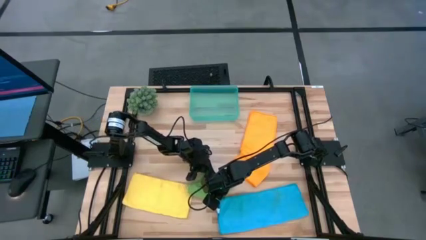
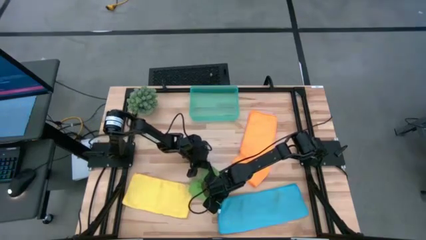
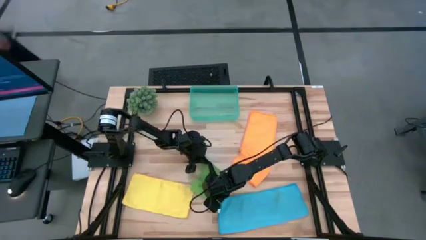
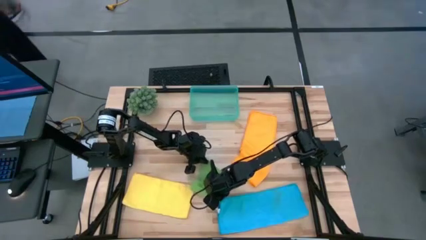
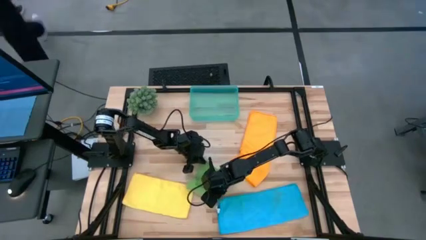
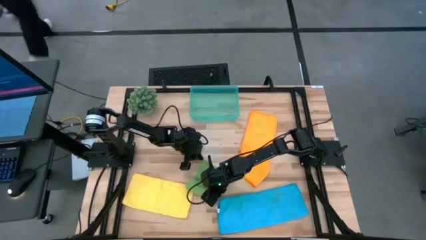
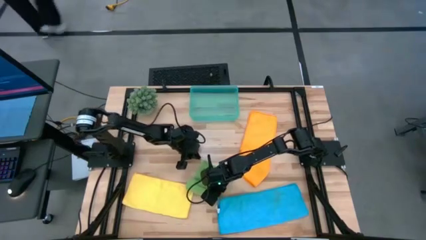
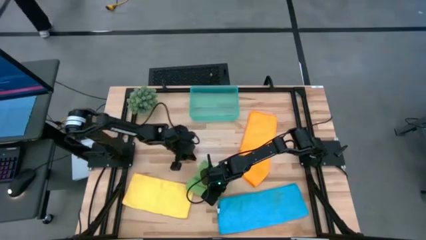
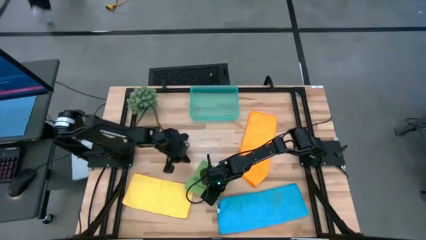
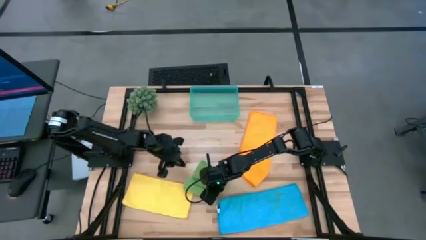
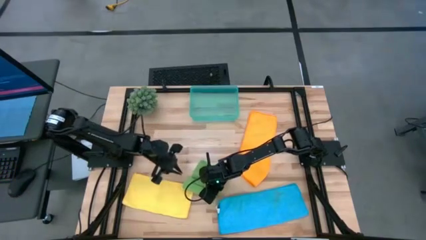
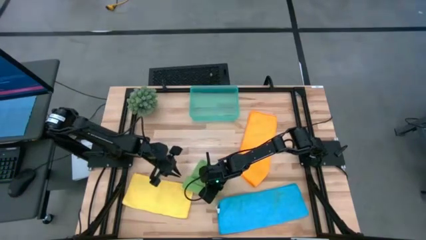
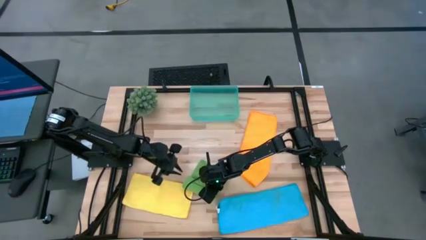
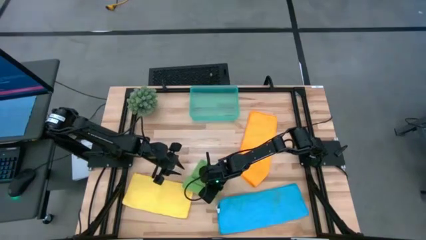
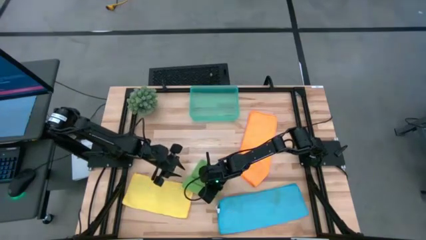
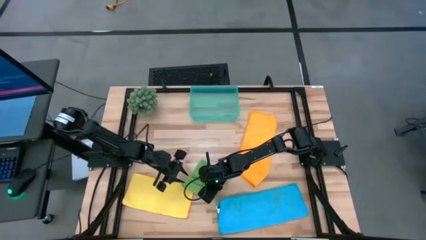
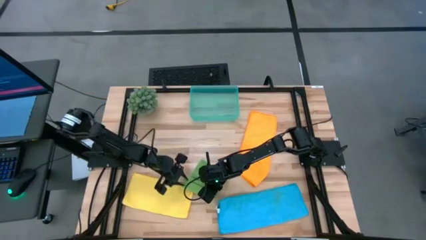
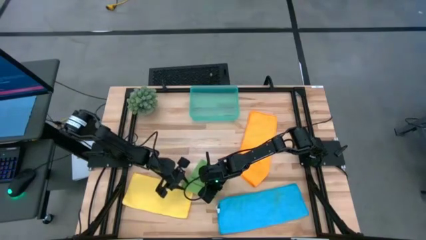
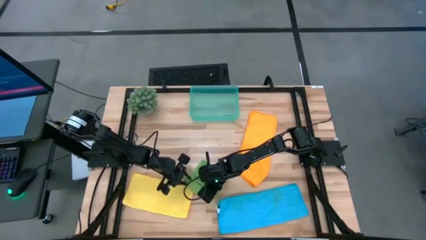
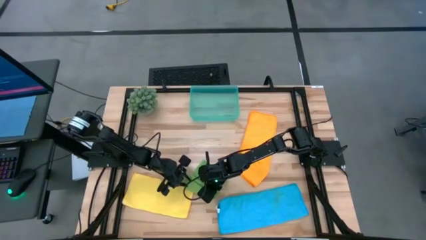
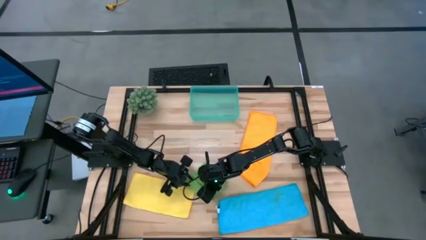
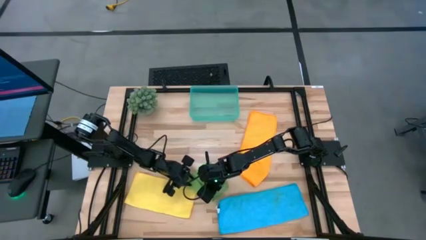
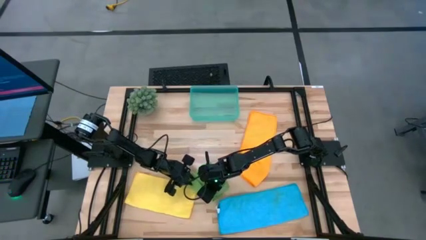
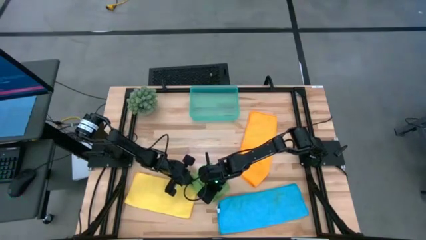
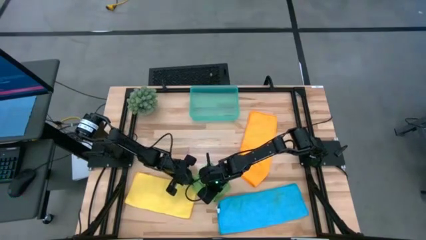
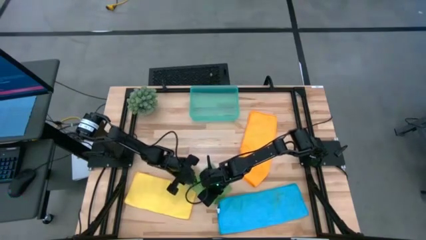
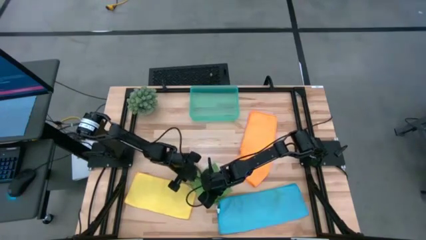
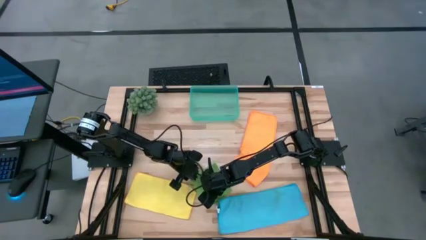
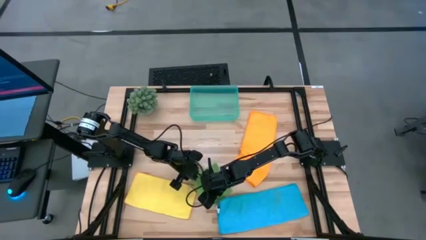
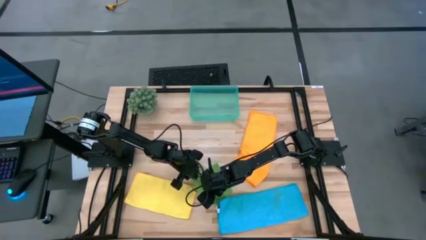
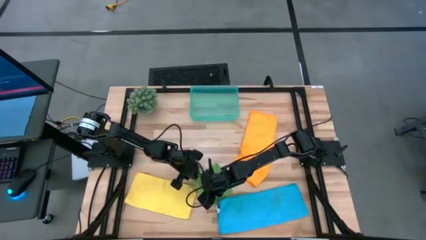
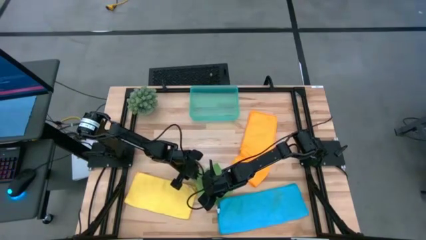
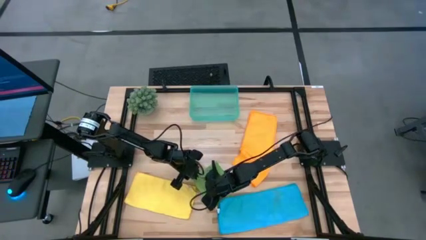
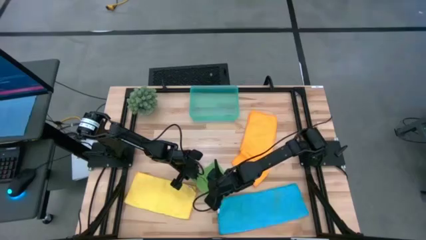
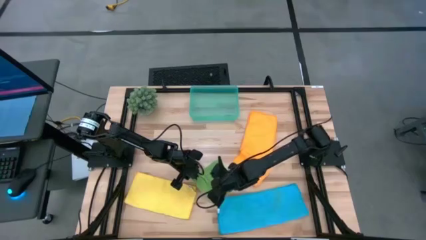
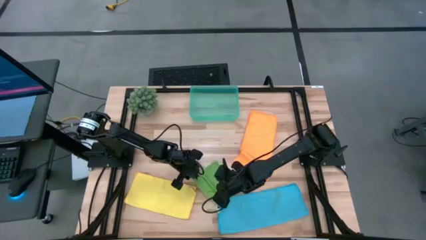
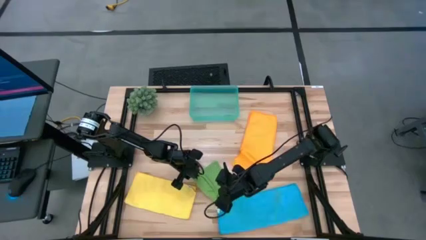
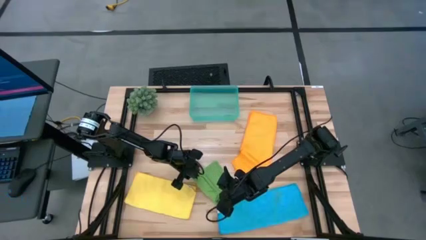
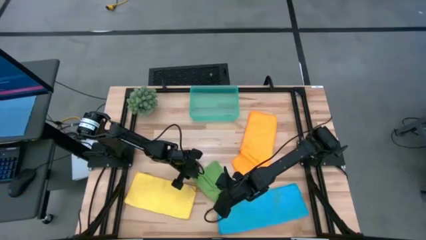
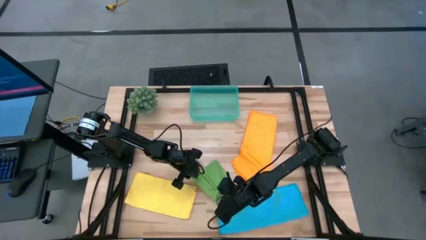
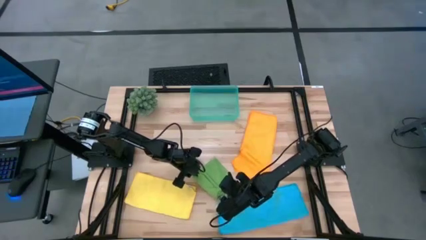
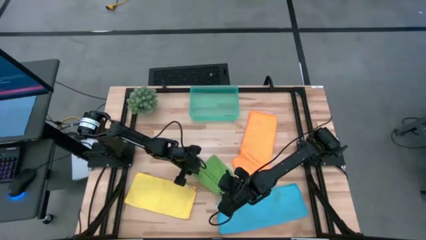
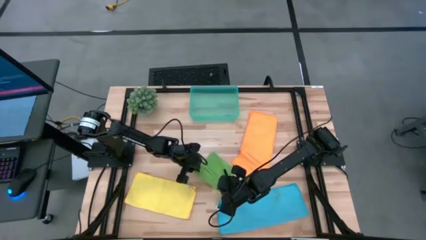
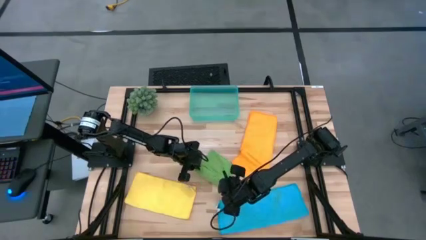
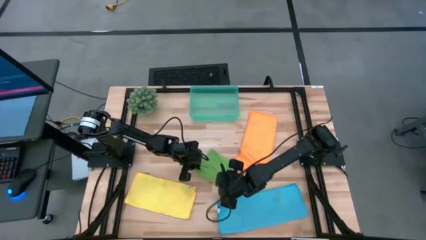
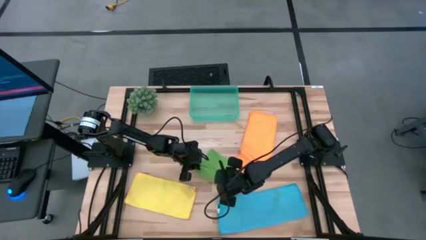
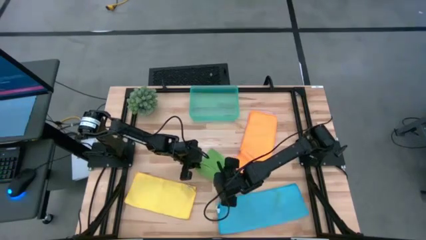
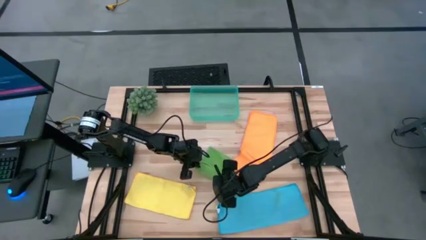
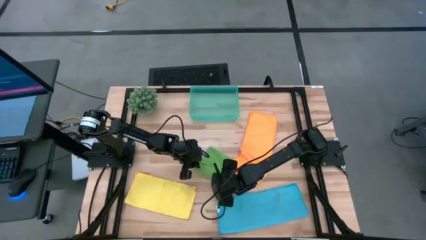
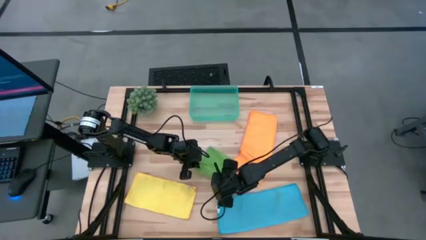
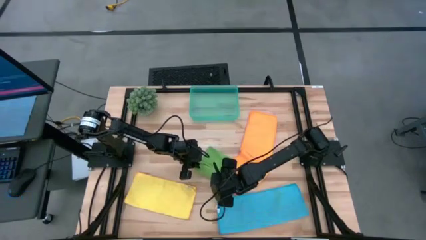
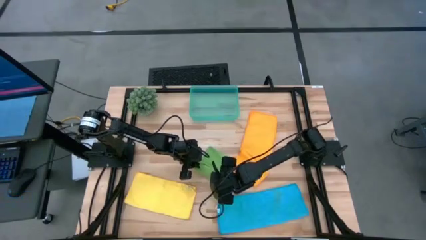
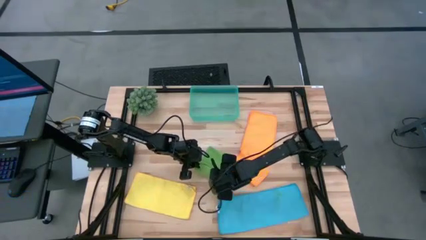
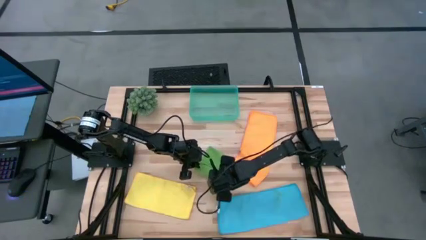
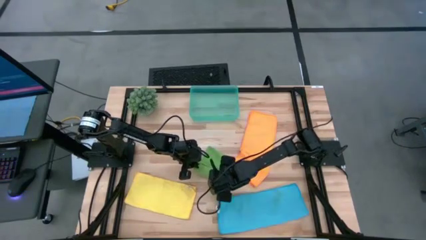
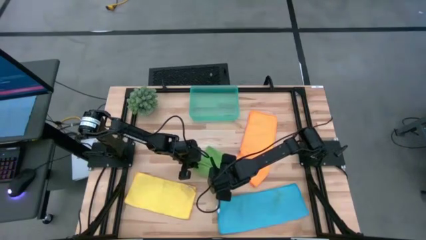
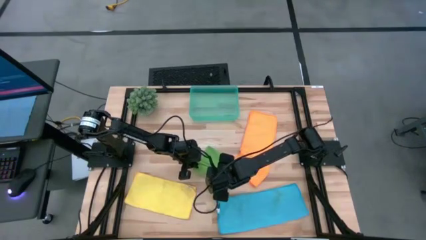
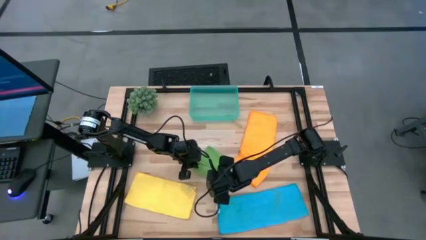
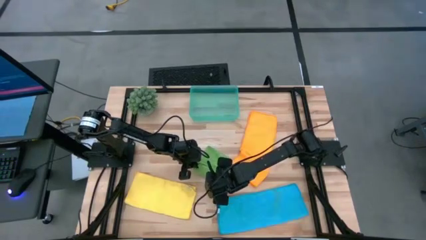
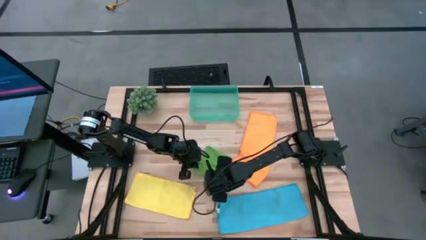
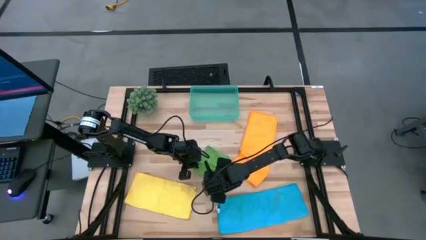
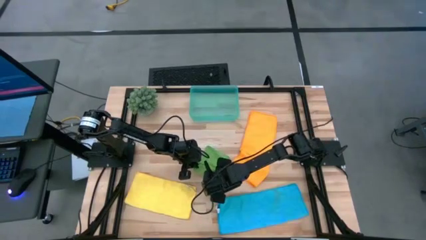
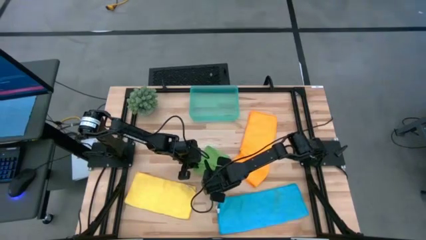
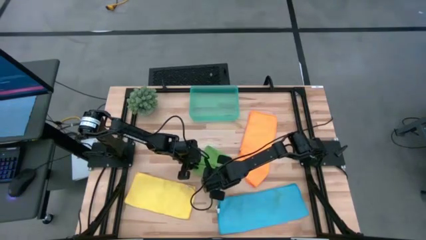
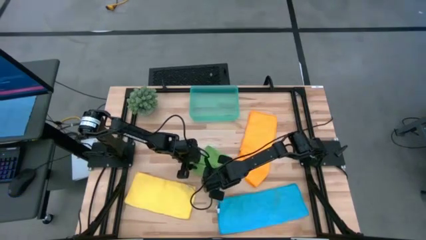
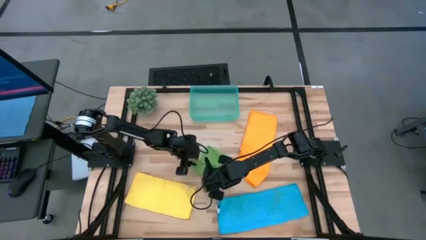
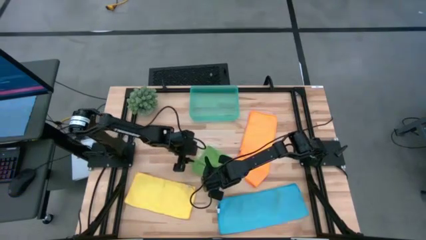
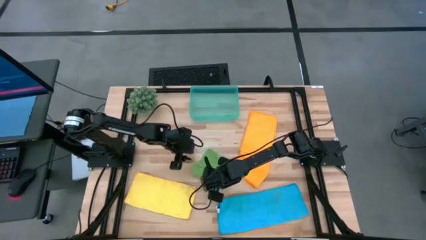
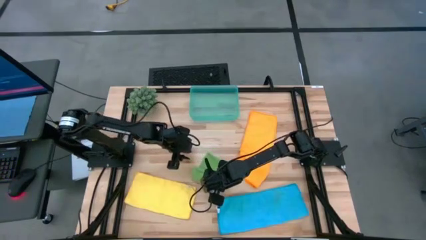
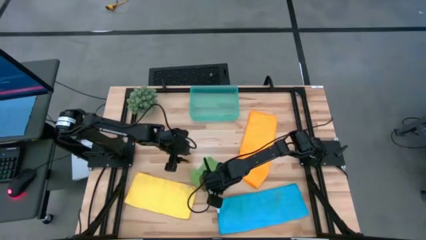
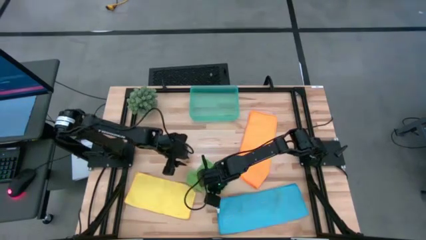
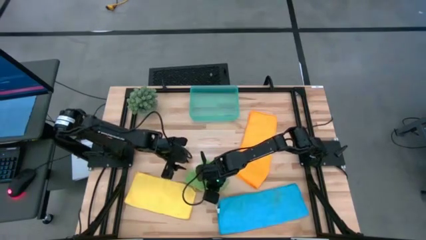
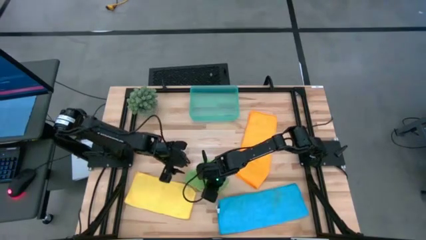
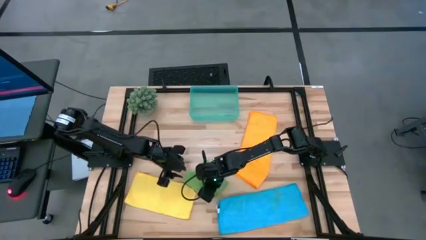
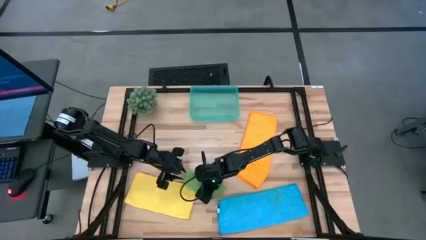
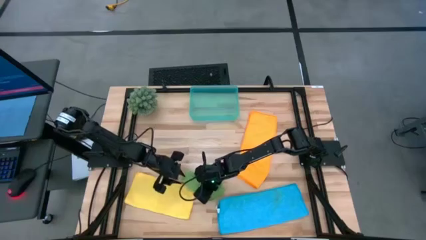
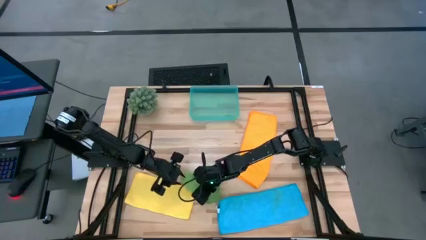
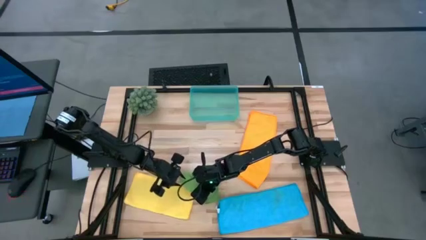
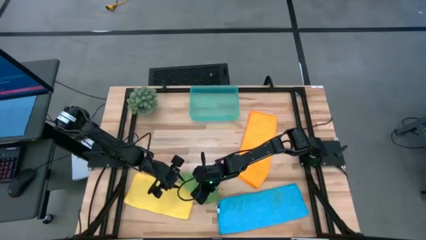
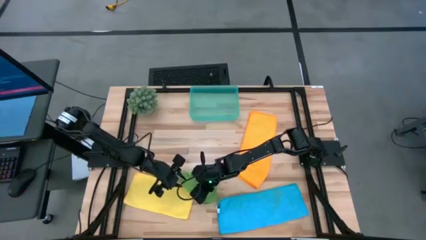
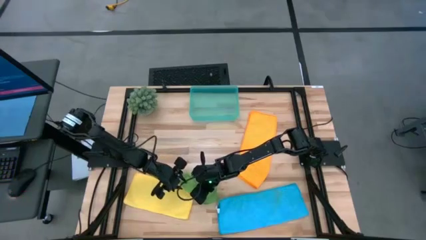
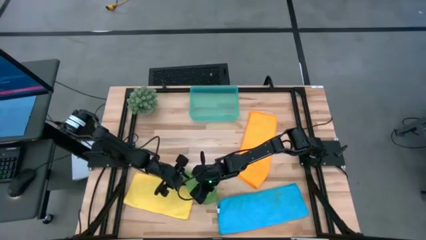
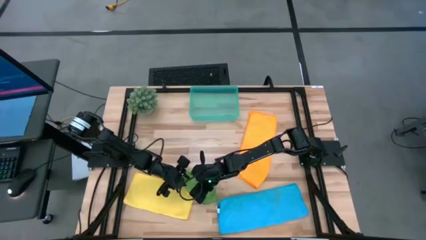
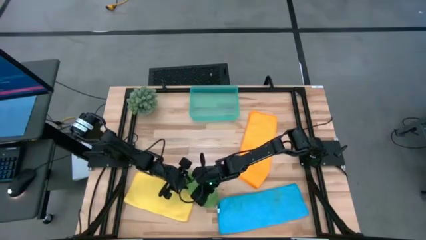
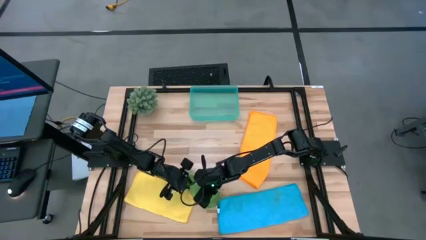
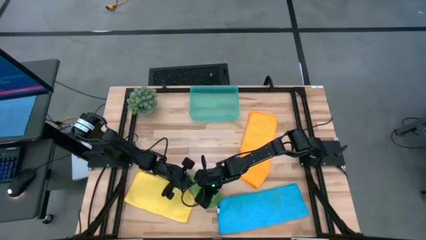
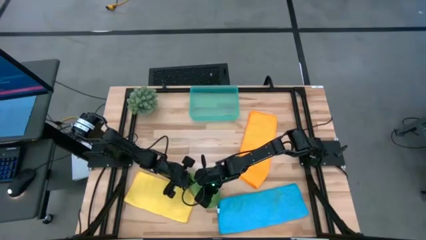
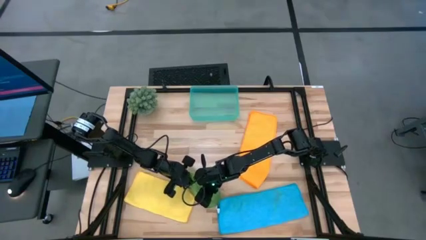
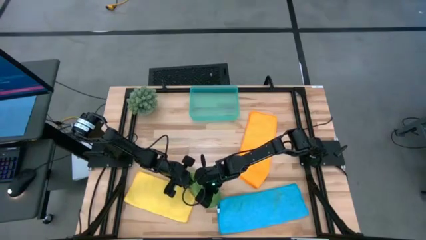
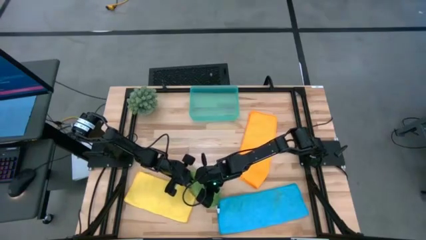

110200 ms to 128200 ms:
Task: Roll microfiber towels into tight, uniform cylinder then place into a basket
Roll the green towel
